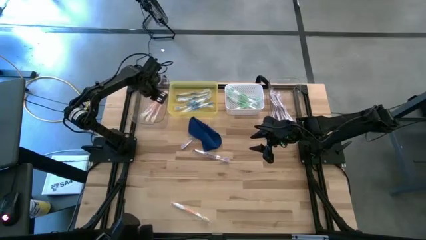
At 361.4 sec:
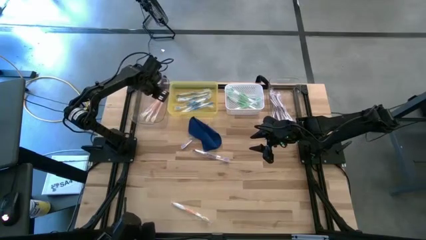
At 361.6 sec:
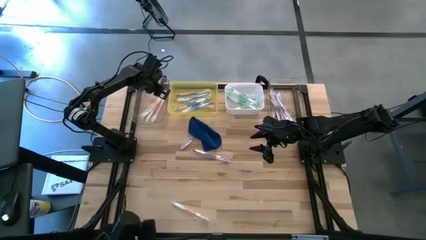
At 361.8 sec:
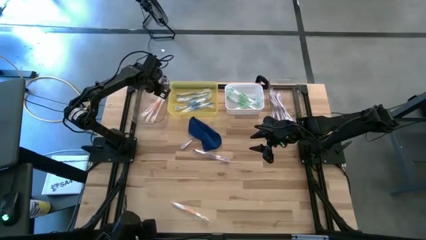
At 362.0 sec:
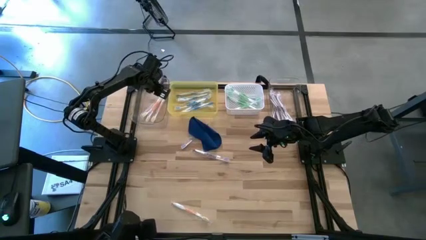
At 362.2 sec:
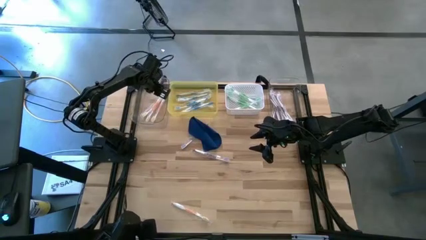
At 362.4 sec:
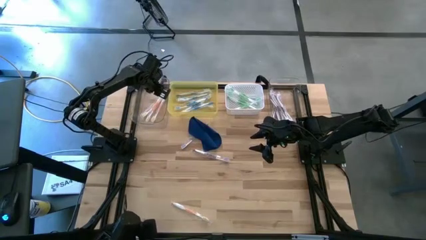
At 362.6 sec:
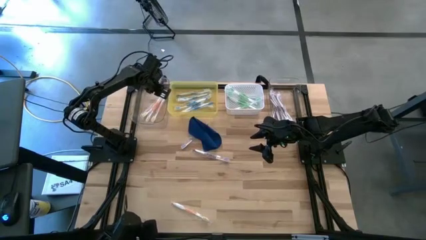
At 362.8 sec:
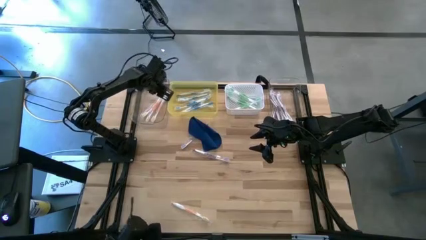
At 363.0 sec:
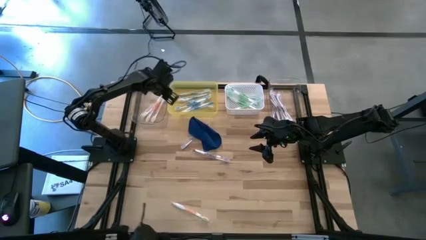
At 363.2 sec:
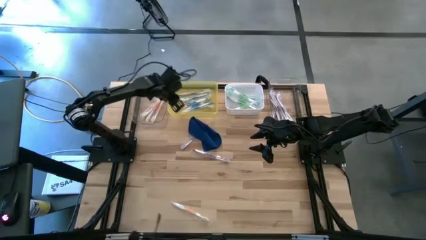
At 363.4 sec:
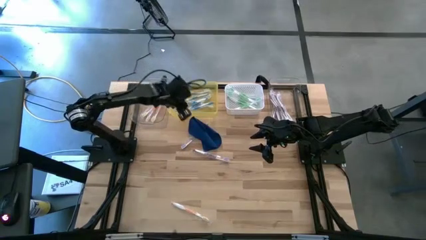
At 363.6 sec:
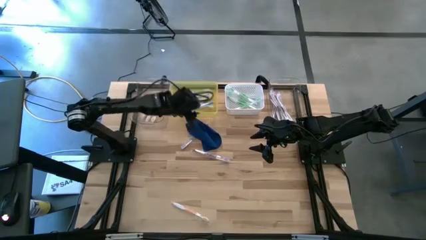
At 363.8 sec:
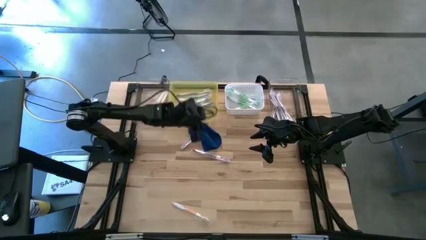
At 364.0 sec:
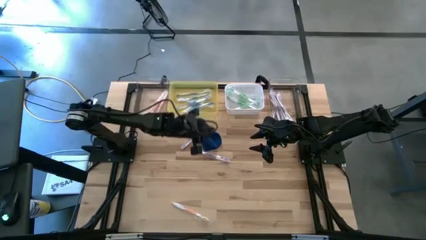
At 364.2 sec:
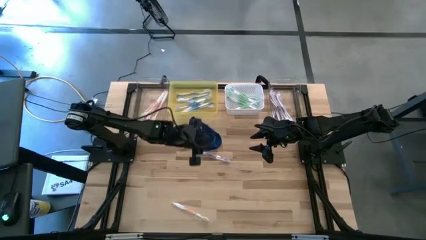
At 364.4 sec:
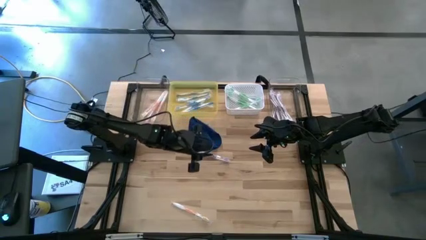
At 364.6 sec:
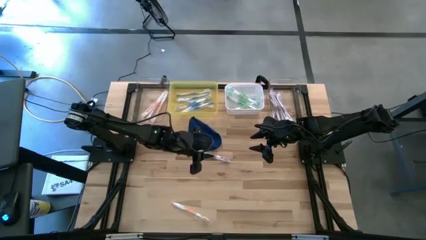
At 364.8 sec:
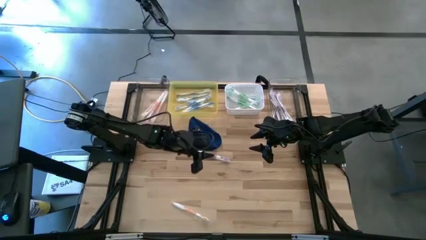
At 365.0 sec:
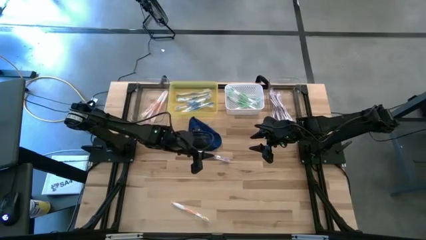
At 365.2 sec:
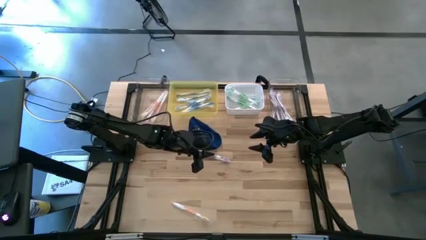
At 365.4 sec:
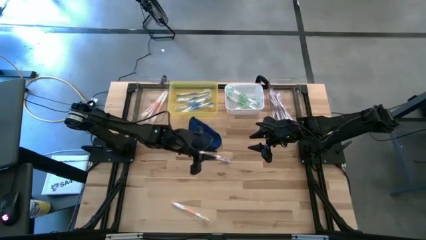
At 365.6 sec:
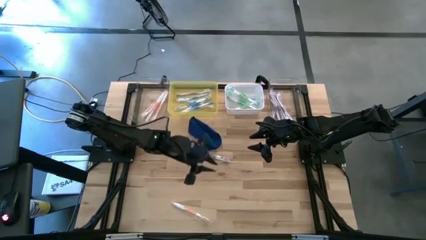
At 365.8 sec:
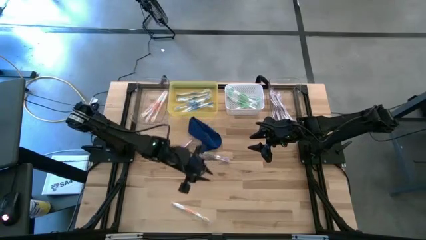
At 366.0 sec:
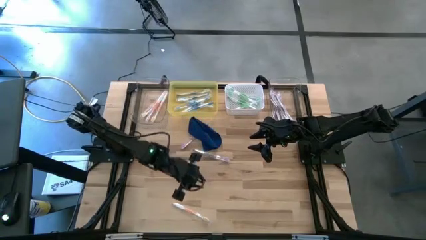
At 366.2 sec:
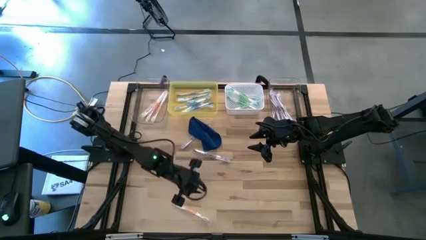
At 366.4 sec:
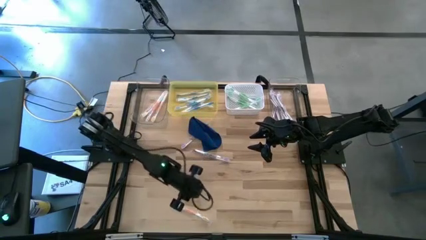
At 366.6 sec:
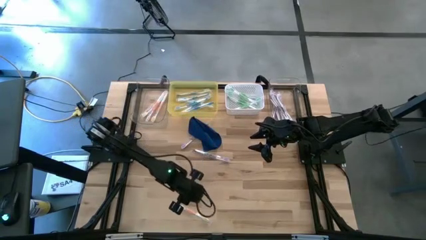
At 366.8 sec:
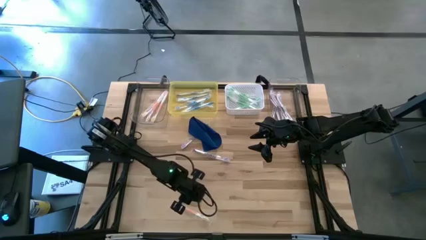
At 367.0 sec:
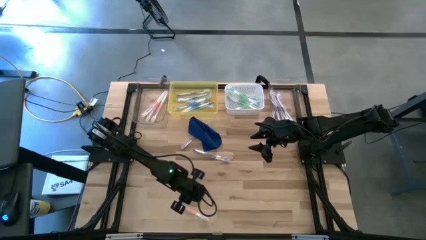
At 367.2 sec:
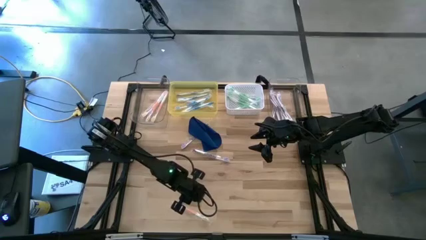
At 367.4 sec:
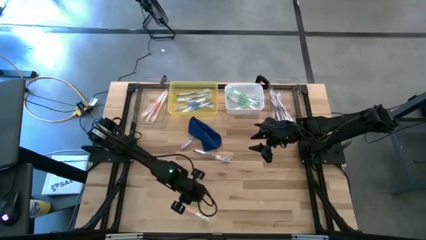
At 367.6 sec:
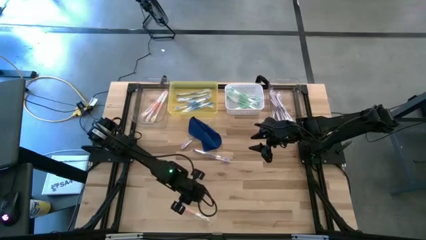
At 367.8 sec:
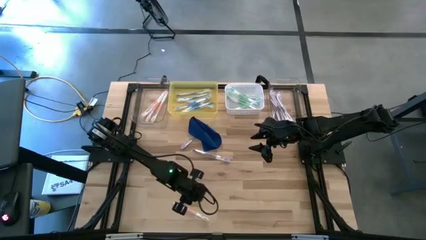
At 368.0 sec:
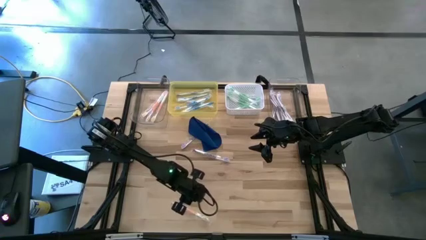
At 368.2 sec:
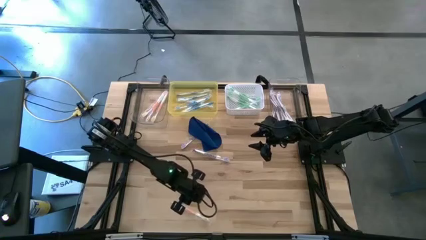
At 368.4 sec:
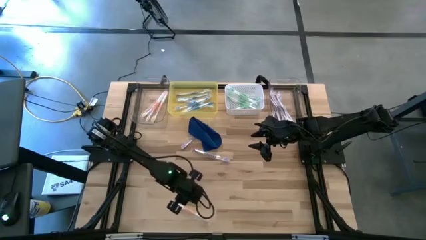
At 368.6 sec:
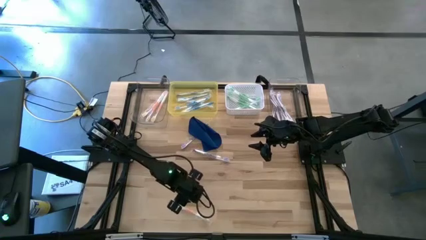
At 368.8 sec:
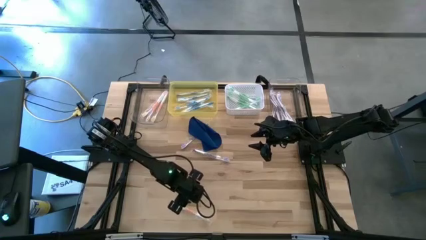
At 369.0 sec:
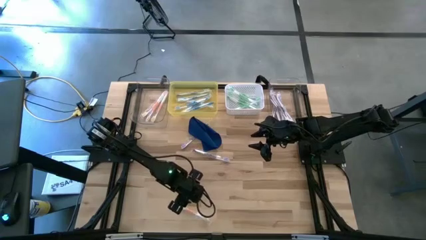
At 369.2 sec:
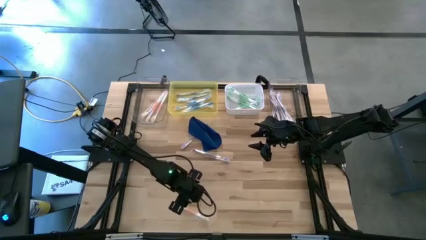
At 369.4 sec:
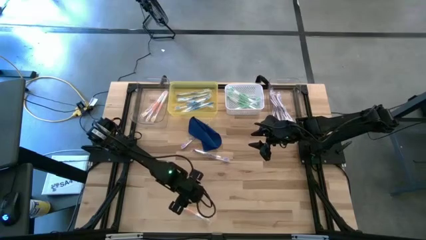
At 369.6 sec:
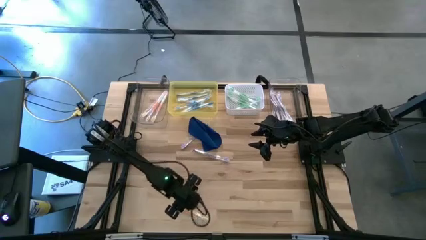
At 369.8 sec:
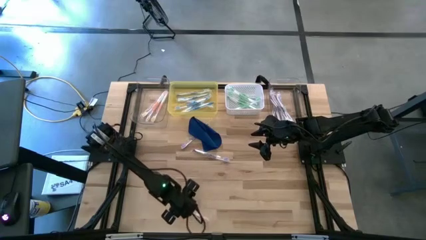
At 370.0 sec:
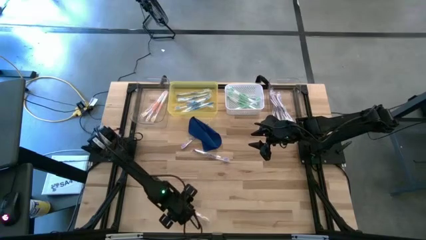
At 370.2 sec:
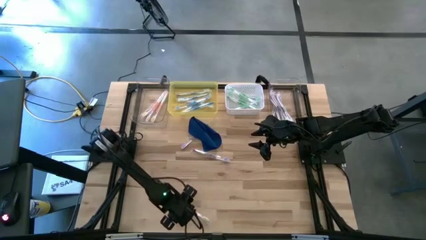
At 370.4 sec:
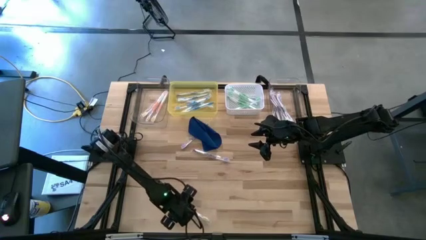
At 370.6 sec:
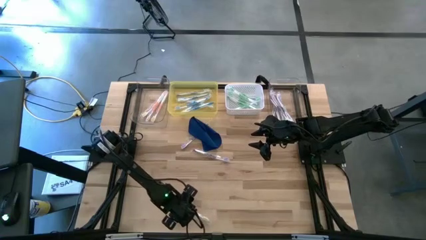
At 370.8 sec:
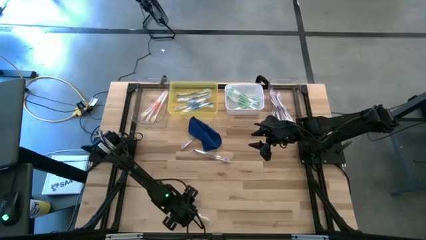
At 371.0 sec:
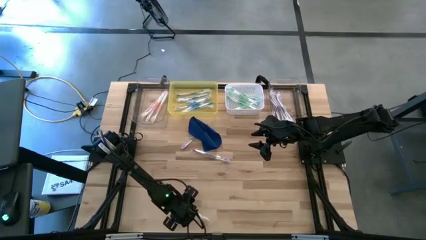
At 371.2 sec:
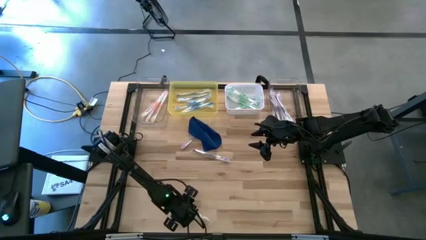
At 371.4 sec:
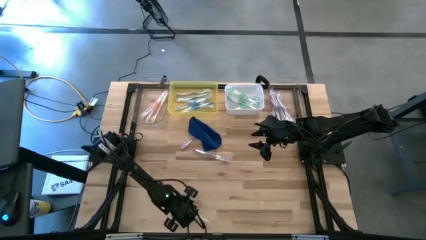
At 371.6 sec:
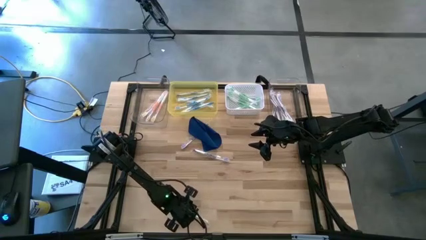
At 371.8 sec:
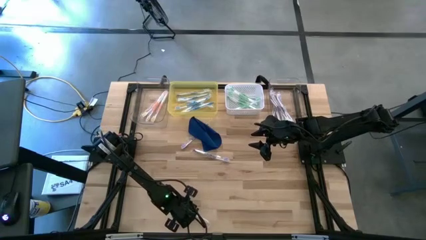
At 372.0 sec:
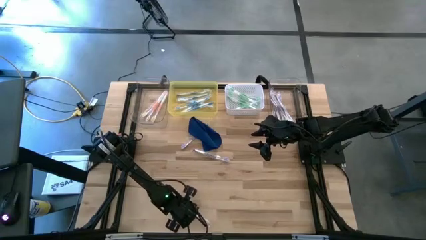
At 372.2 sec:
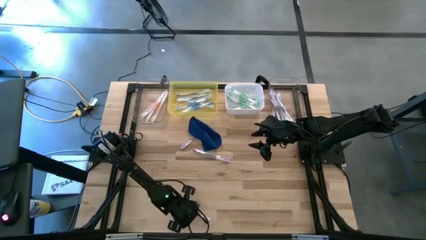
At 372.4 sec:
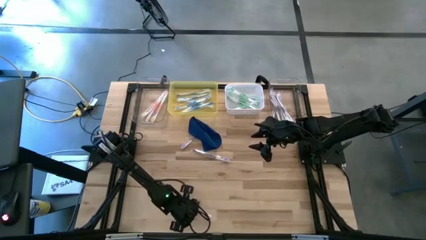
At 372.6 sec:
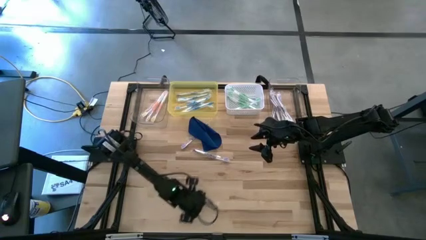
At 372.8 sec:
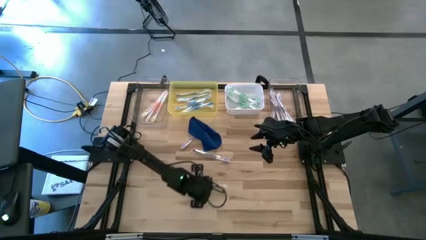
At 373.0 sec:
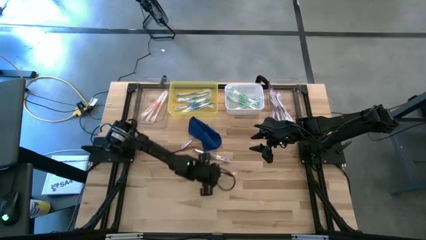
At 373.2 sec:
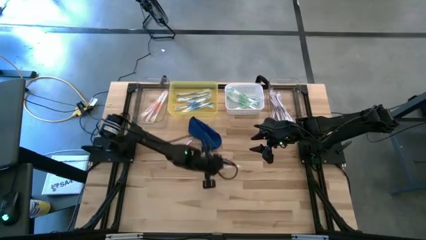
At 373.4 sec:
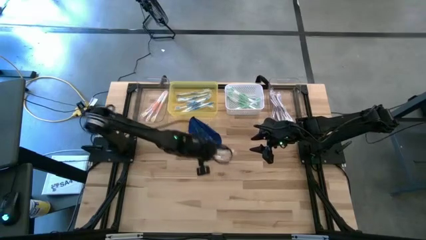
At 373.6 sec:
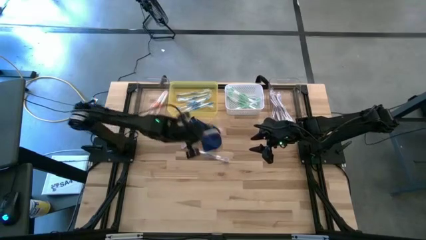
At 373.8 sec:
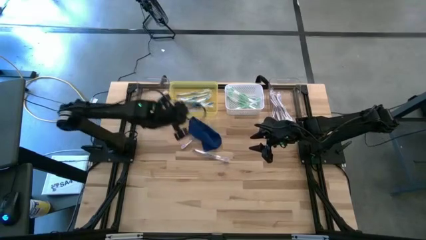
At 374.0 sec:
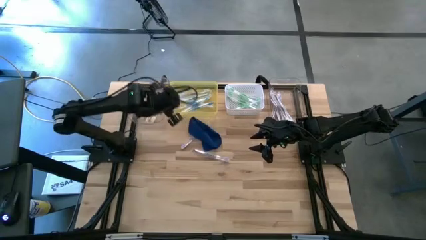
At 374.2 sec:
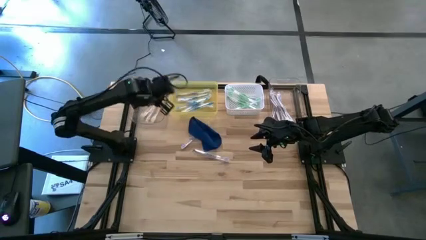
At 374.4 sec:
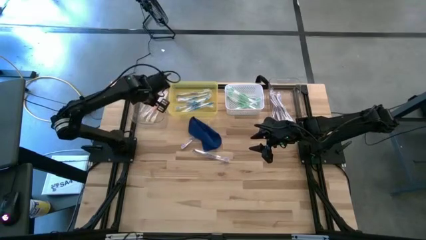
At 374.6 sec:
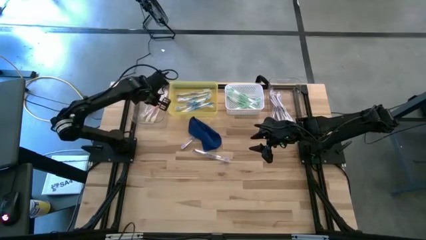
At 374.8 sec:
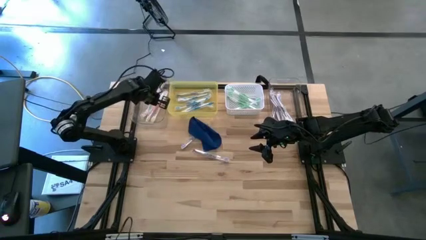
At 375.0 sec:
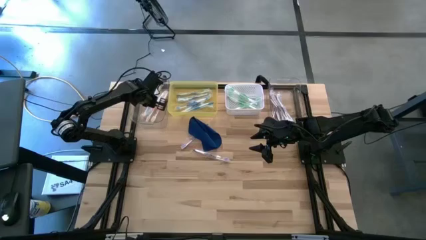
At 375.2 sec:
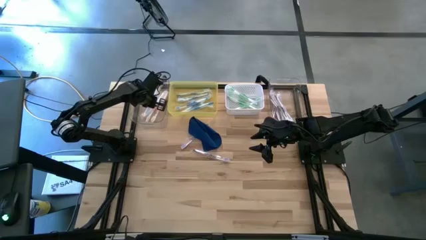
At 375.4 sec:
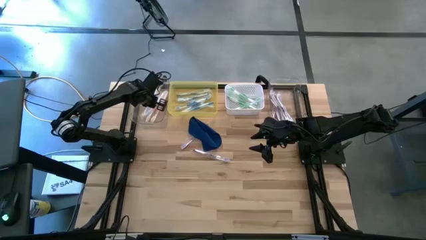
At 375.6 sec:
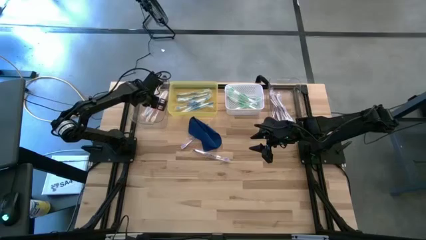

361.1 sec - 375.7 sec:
Task: Pick & Place Toothbrushes
Put the violet toothbrush into the right transparent bin

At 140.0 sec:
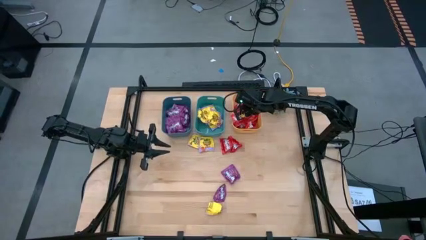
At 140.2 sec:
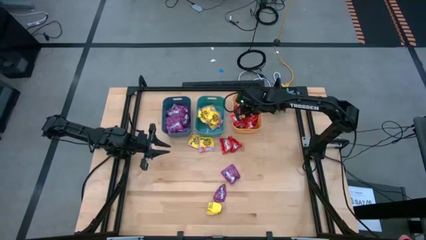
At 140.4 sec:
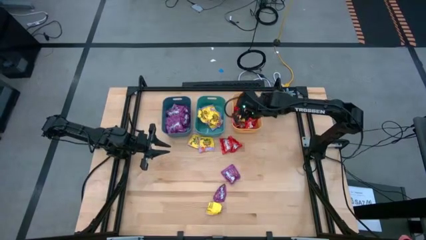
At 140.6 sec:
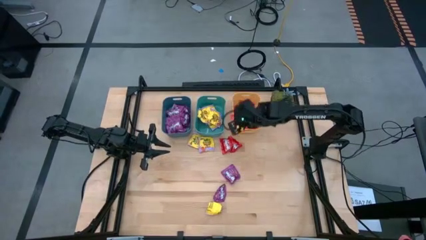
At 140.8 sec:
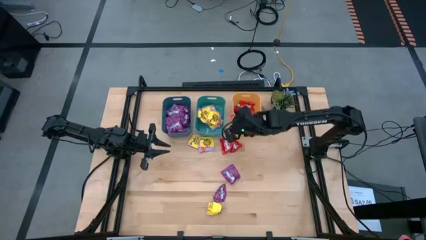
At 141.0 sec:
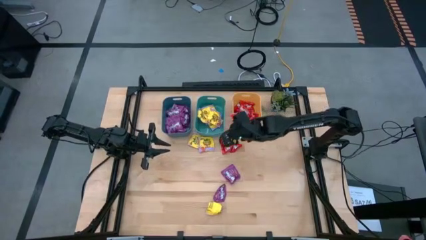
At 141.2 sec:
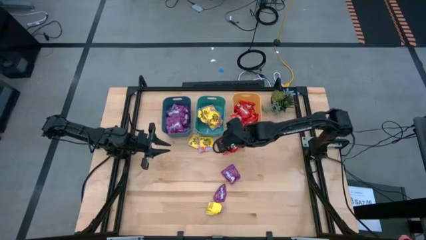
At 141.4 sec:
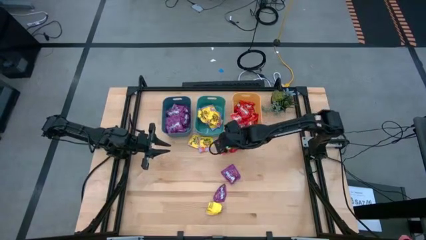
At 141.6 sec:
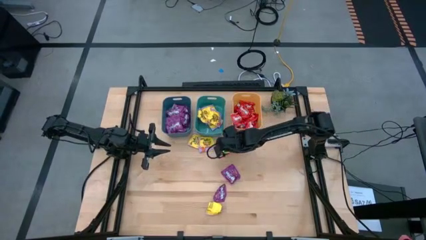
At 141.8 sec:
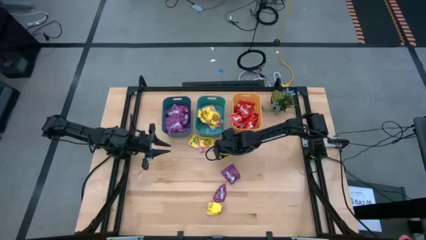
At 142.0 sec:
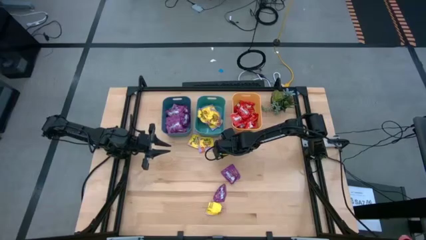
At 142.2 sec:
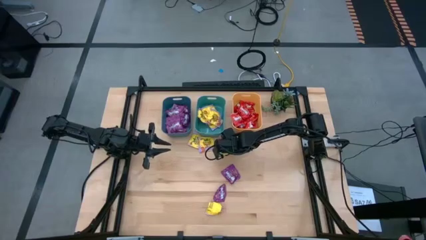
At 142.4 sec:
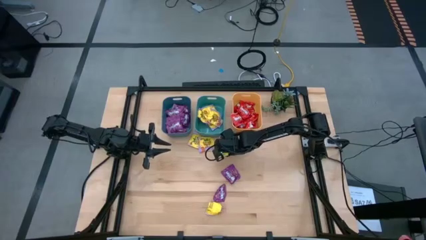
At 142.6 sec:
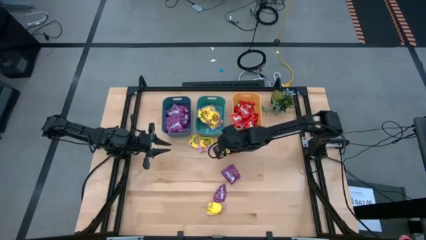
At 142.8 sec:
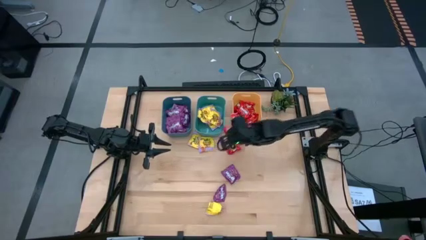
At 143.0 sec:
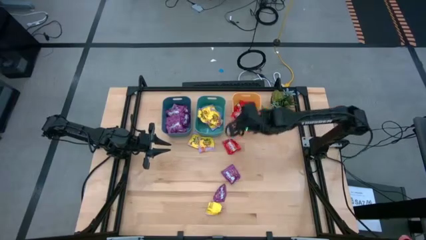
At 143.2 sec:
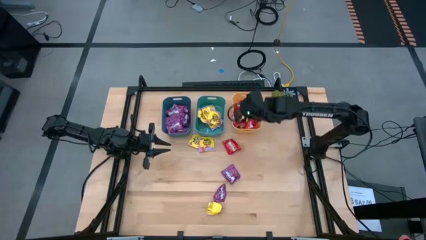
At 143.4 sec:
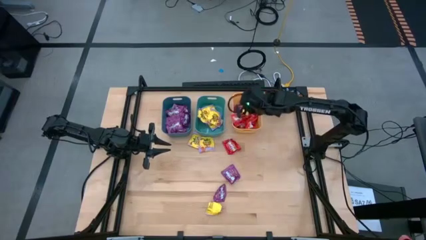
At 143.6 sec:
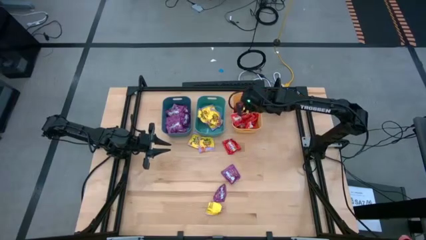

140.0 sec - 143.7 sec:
Task: Sort candy
Put the red candy into the yellow bin
